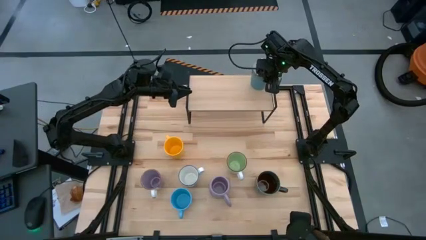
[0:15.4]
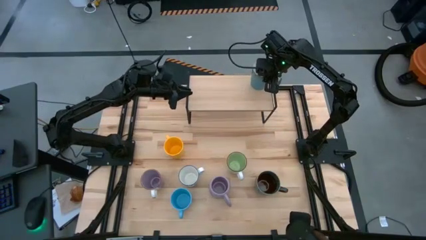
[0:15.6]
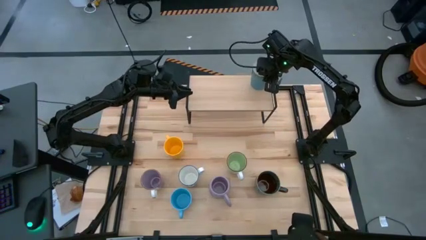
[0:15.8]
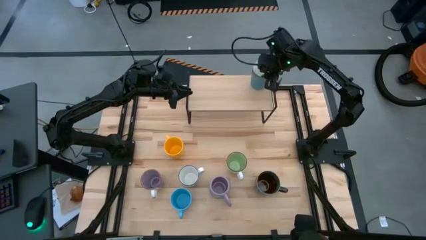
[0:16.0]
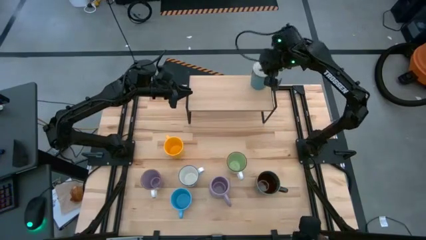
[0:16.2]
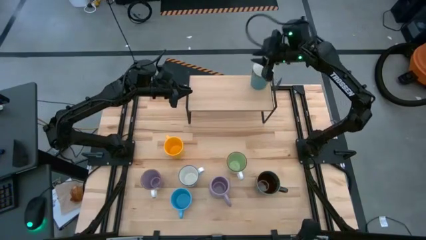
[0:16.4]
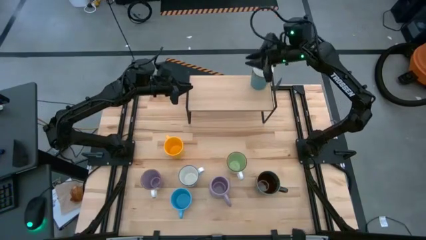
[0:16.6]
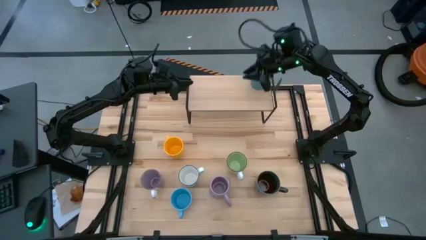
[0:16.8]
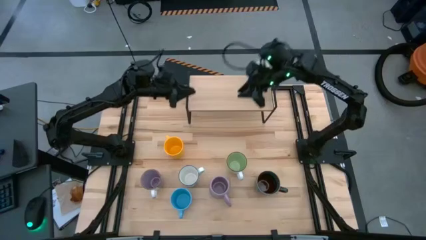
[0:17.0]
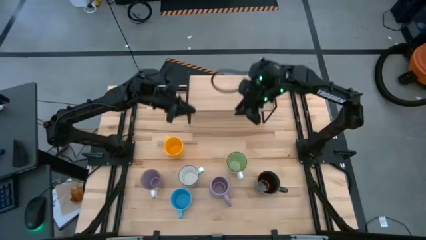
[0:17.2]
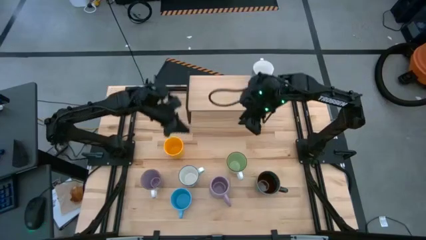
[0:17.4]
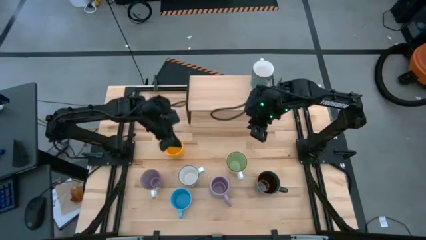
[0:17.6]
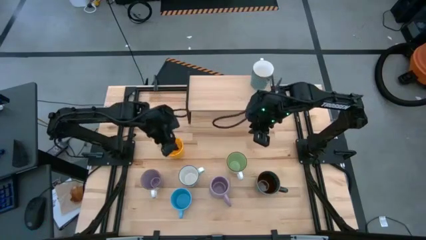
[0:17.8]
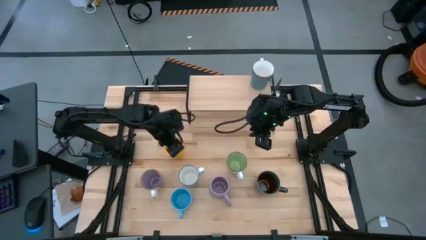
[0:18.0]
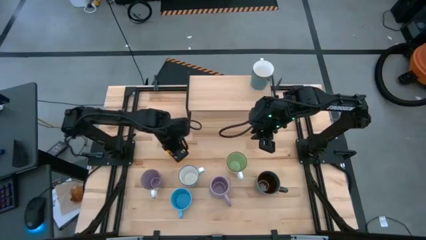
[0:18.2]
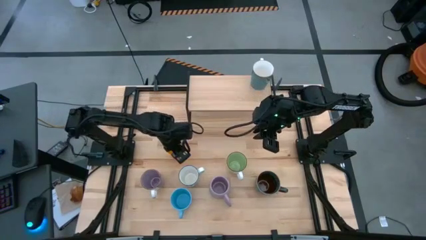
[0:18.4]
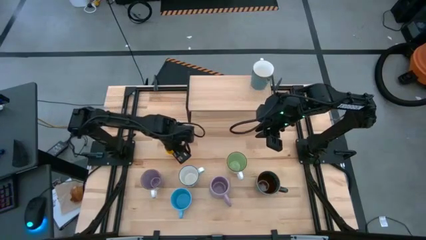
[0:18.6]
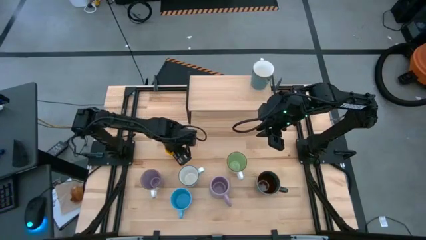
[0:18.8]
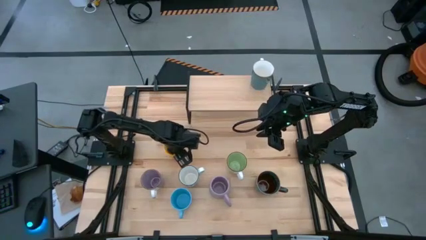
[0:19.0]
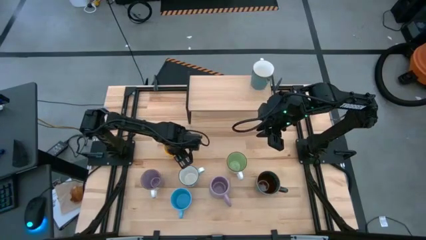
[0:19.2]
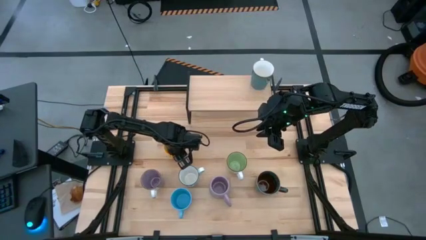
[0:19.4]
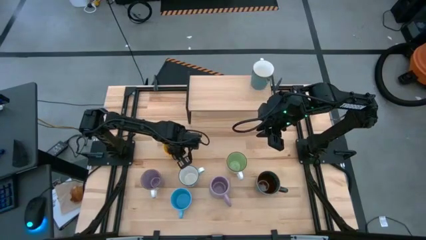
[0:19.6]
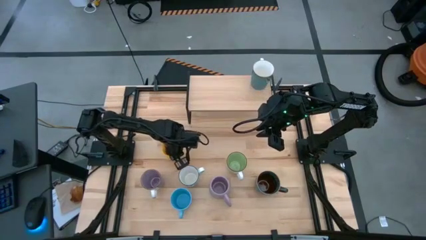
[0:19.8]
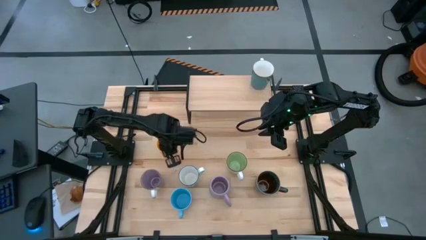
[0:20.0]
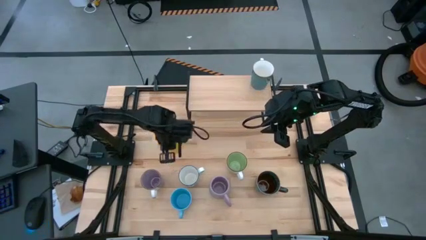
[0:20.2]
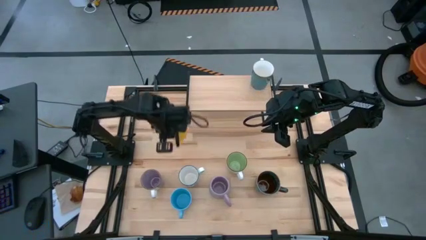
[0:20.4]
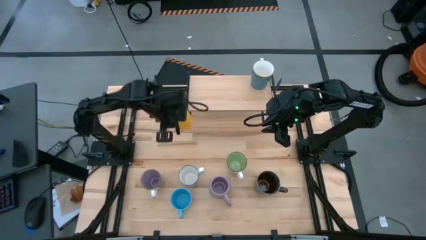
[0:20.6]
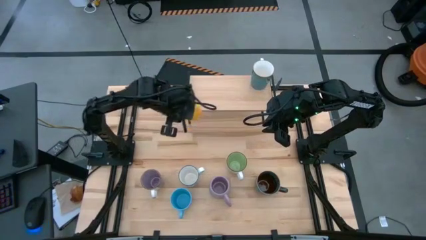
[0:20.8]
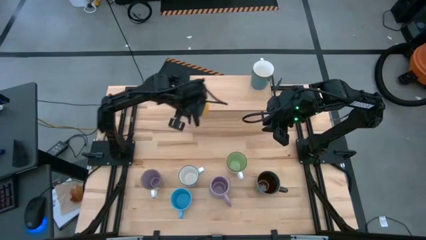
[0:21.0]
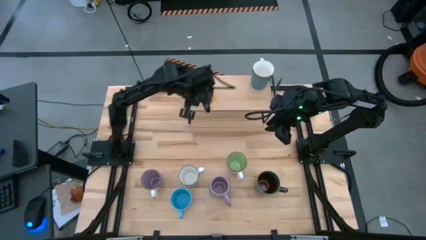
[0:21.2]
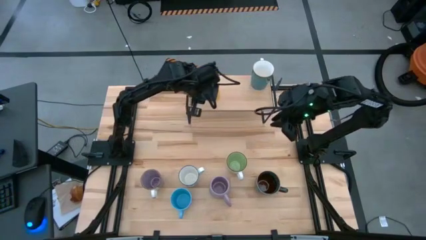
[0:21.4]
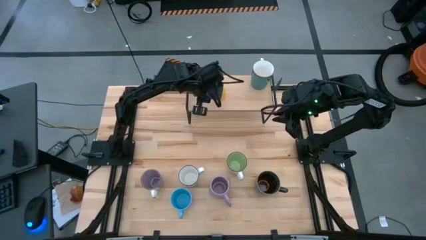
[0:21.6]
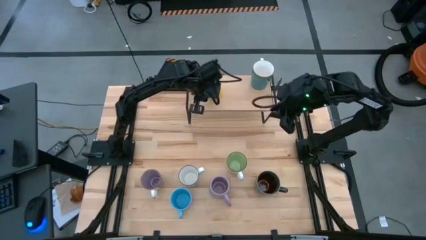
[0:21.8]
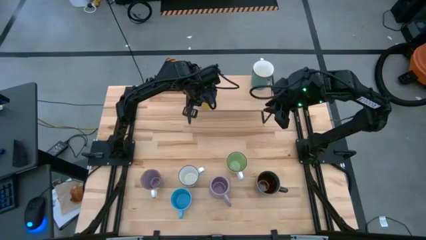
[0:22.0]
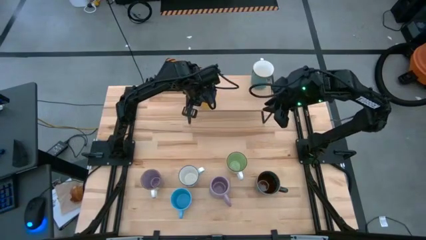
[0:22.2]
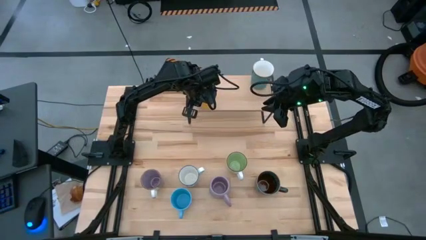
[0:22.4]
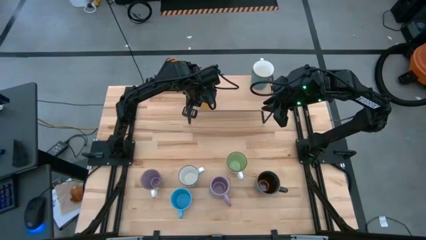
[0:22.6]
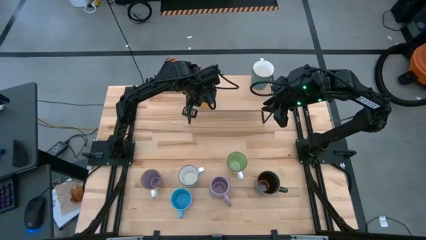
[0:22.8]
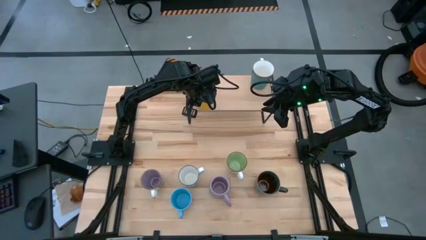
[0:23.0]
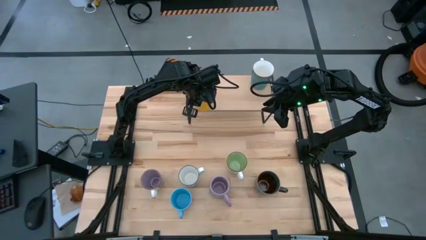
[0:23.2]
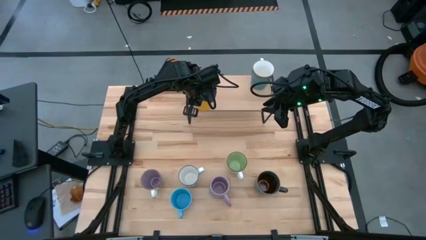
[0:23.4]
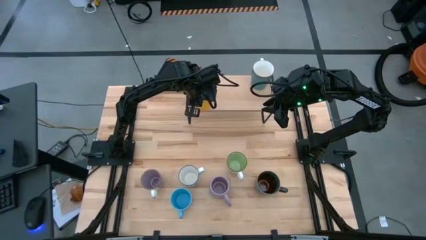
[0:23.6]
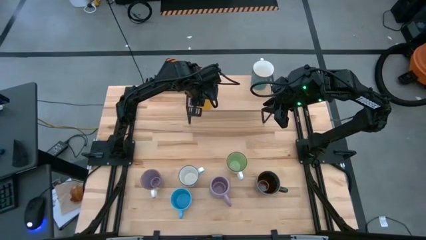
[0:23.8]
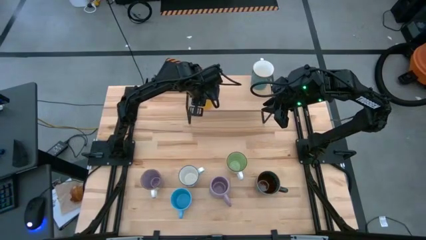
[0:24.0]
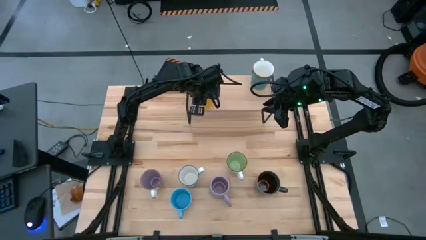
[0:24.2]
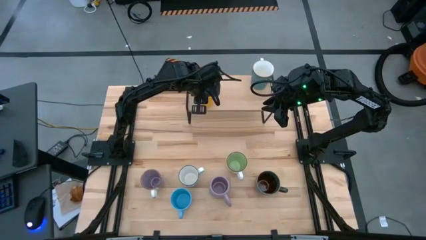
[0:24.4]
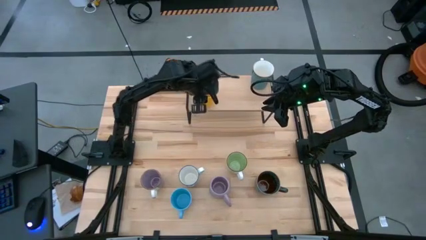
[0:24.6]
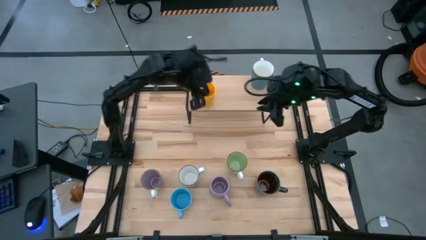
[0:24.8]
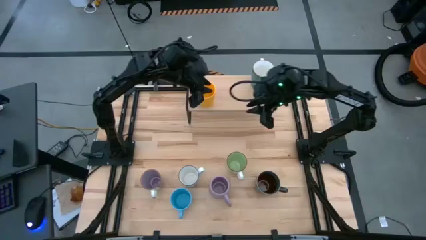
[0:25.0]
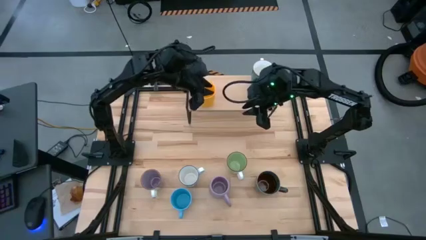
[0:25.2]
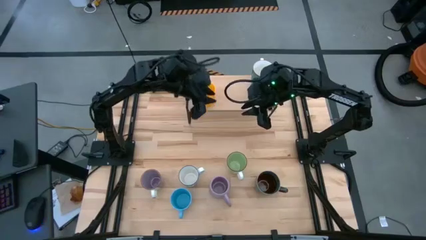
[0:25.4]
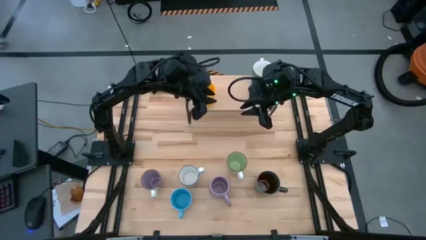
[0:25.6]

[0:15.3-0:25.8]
Task: Place coffee mugs
Put the yellow mug on the shelf

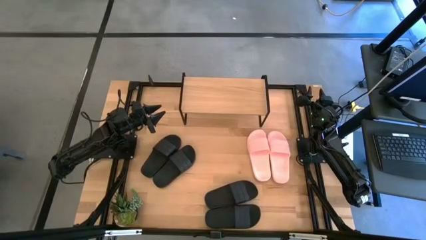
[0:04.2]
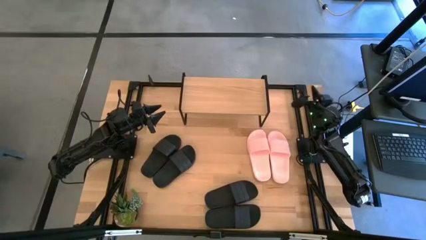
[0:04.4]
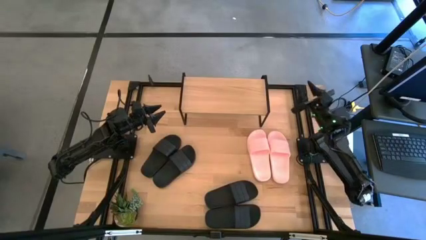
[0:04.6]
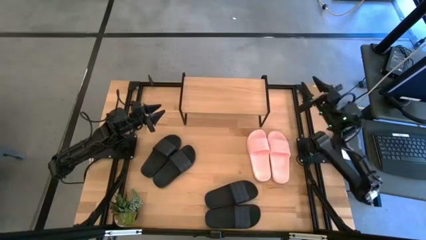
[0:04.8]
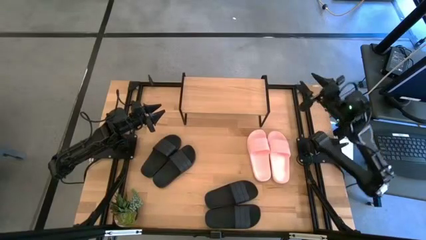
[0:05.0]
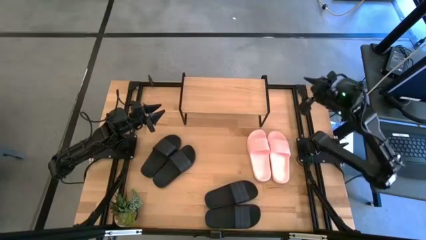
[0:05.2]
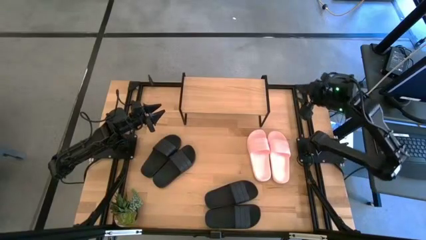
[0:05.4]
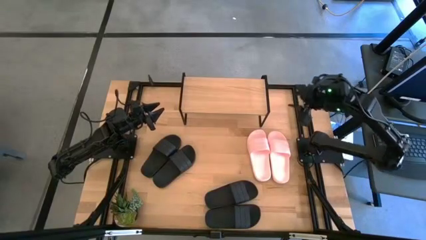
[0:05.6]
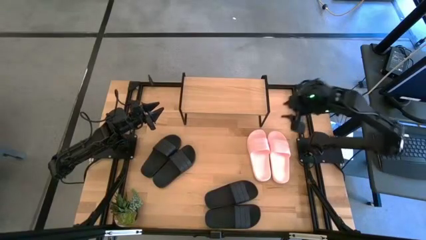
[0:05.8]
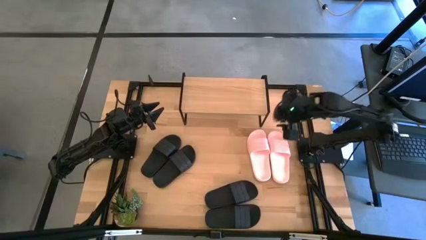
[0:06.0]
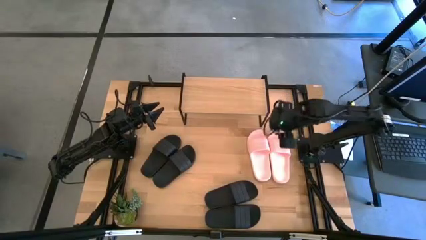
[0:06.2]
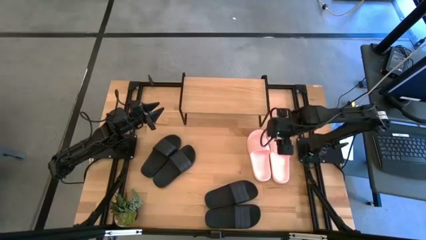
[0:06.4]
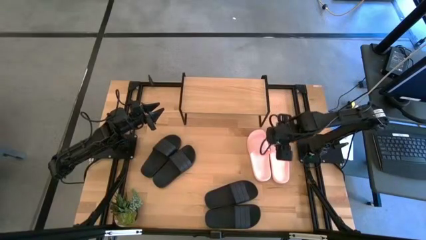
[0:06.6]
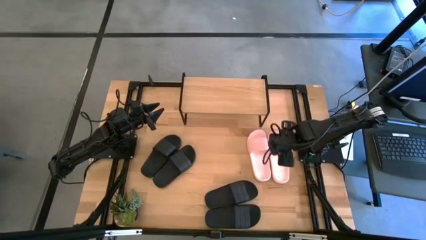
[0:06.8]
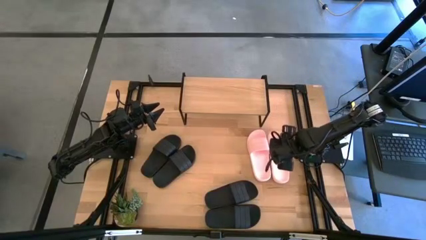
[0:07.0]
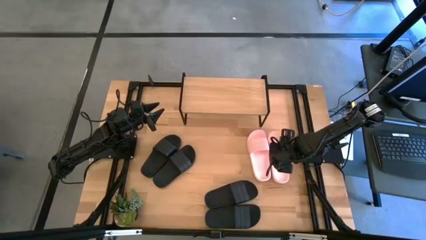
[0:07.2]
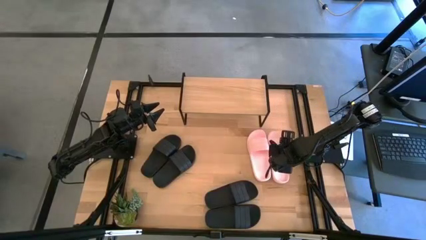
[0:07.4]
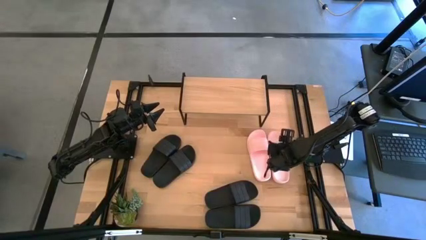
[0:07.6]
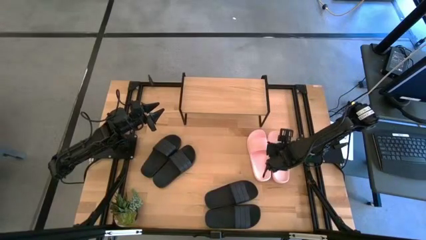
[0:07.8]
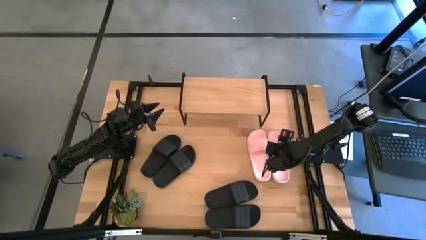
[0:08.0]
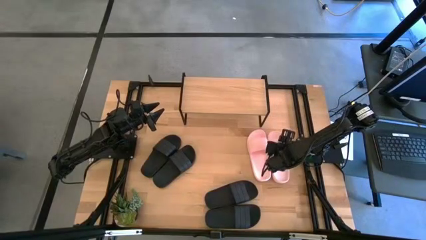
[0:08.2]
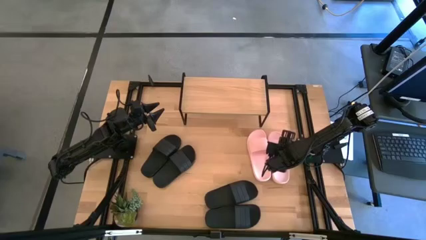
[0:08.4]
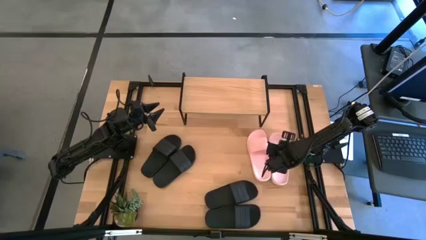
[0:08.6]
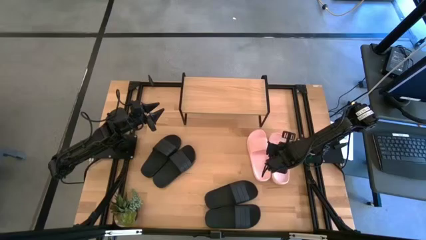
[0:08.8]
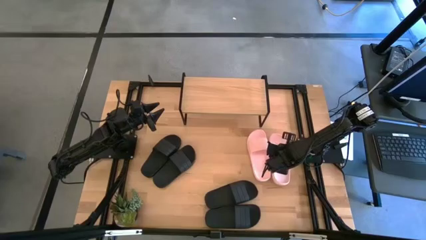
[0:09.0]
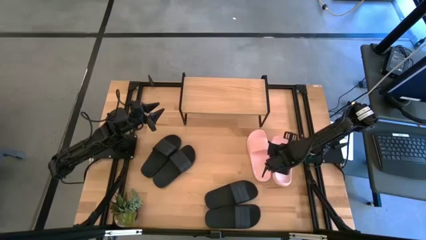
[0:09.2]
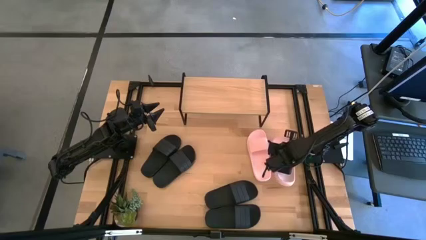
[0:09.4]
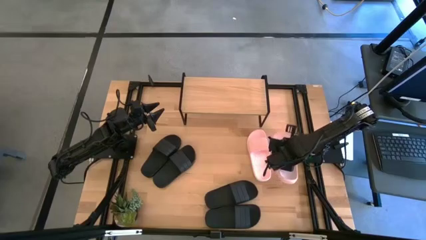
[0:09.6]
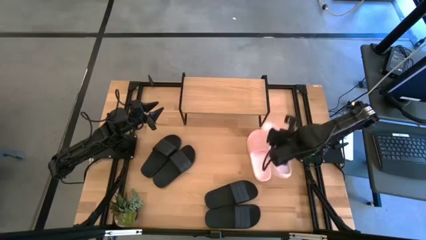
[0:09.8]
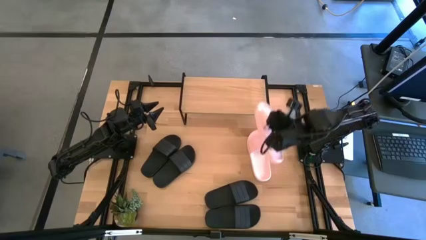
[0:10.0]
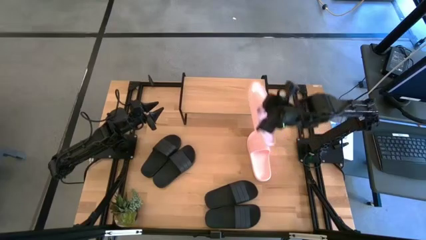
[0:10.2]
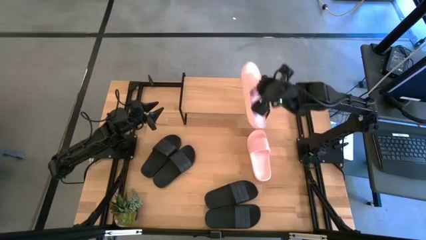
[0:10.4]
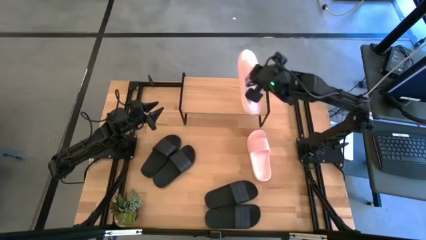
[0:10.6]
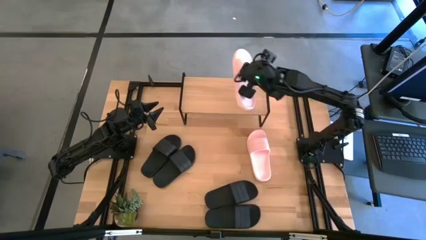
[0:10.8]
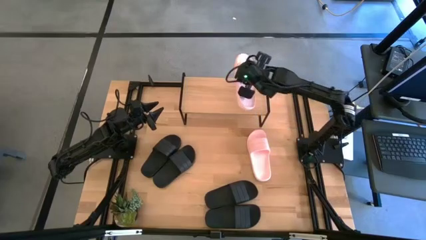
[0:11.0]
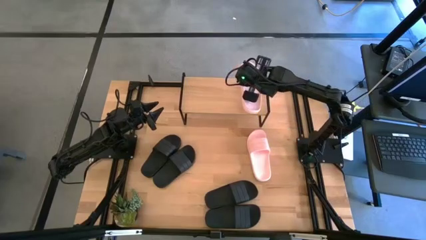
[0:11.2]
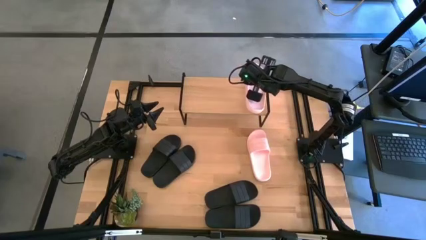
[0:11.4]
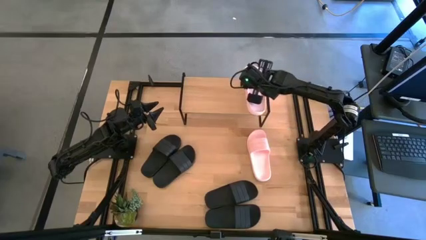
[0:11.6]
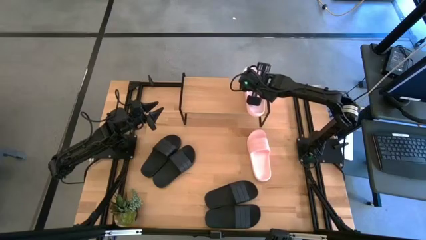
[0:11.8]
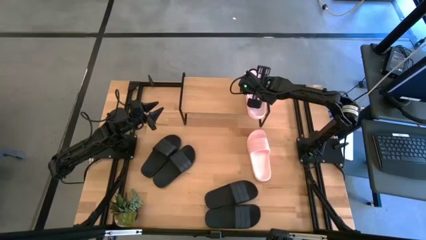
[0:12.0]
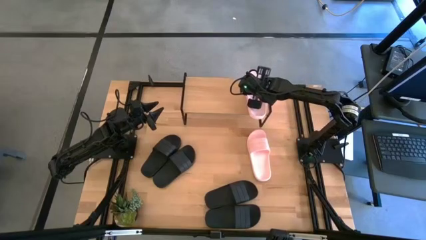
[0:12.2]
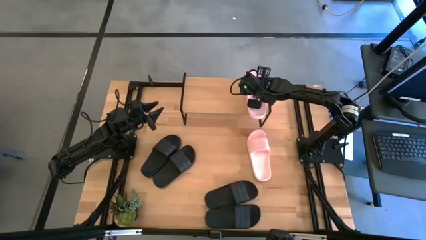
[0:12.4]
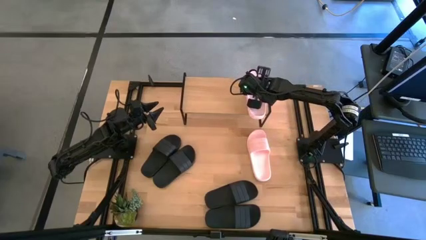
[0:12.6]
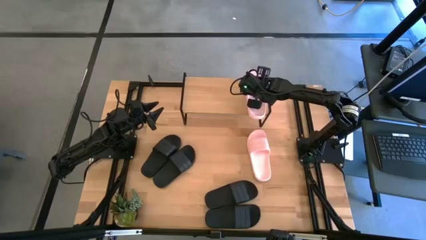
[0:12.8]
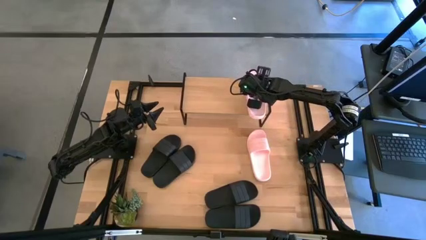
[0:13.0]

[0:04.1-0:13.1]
Task: Pick and place slides into the shelf
Put the right pink slide on the shelf
